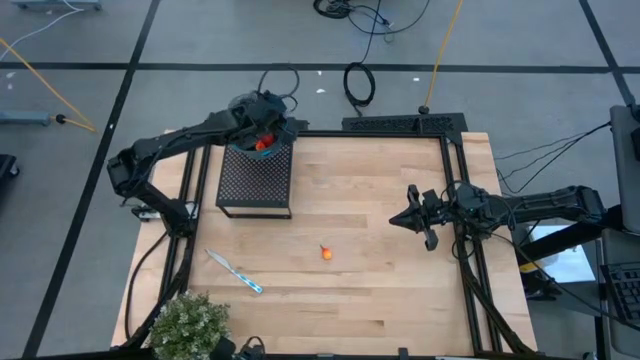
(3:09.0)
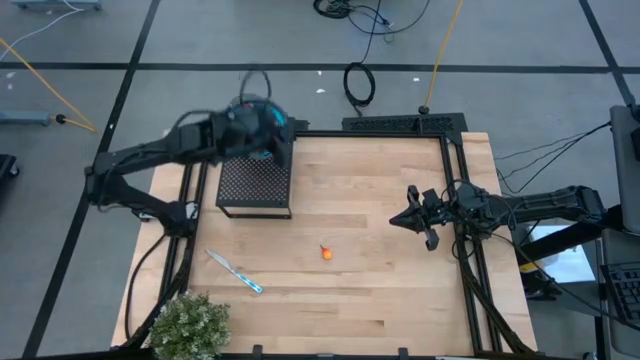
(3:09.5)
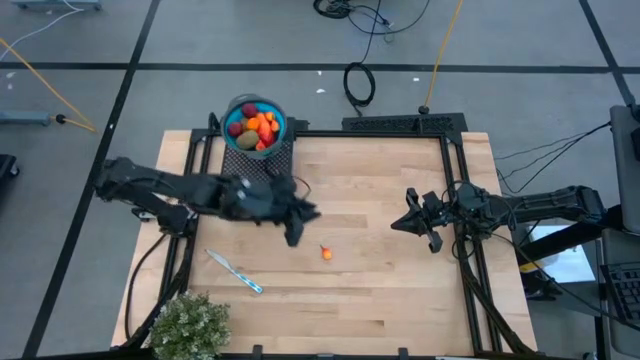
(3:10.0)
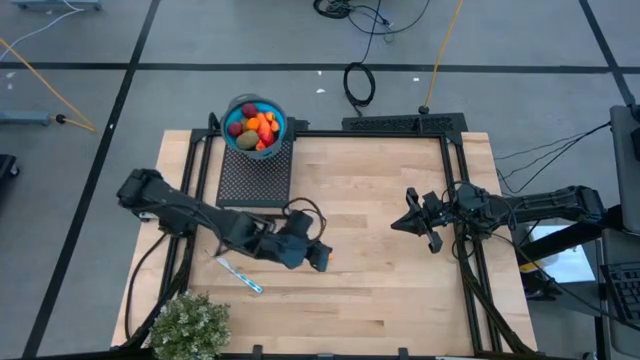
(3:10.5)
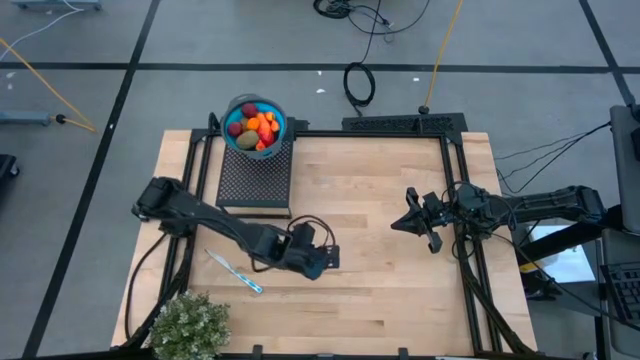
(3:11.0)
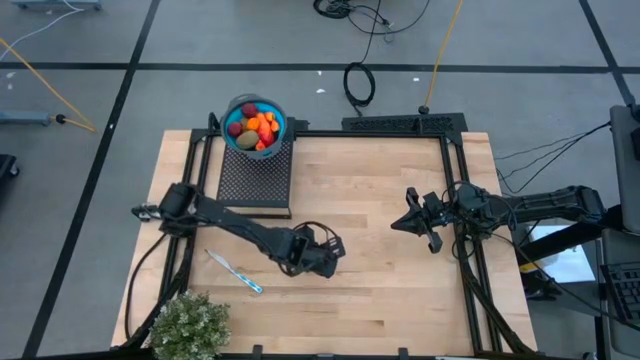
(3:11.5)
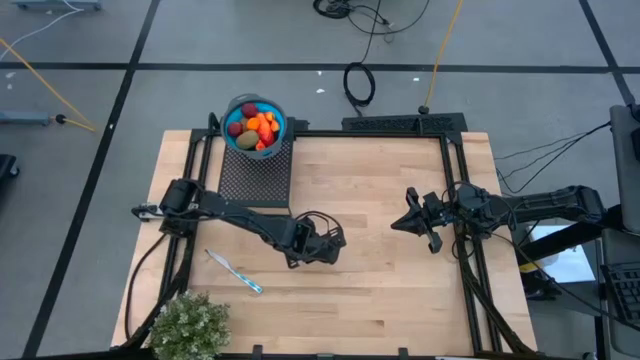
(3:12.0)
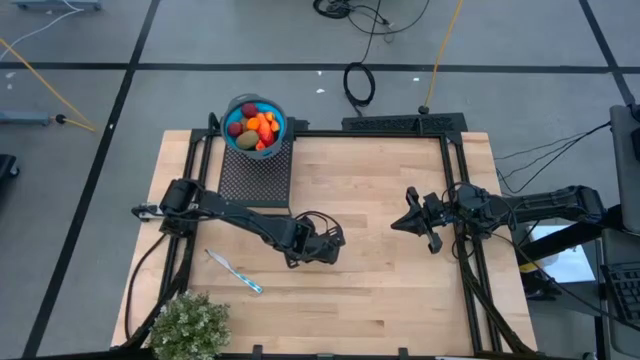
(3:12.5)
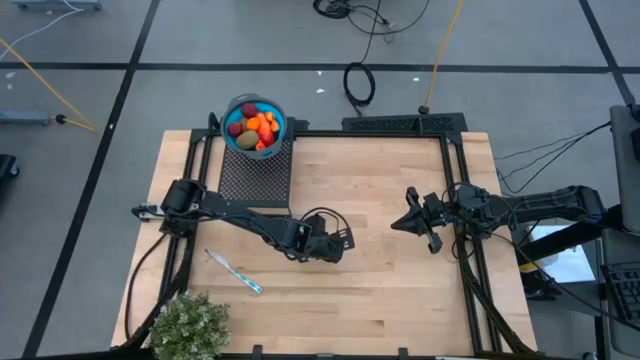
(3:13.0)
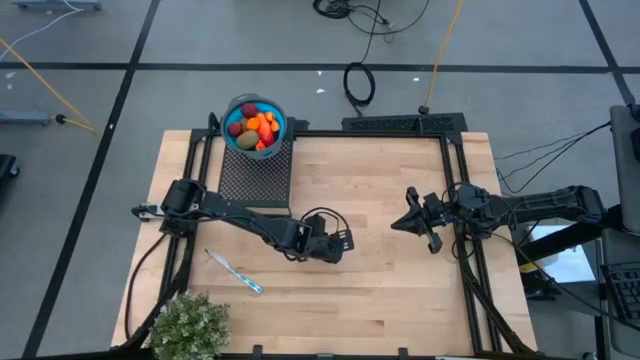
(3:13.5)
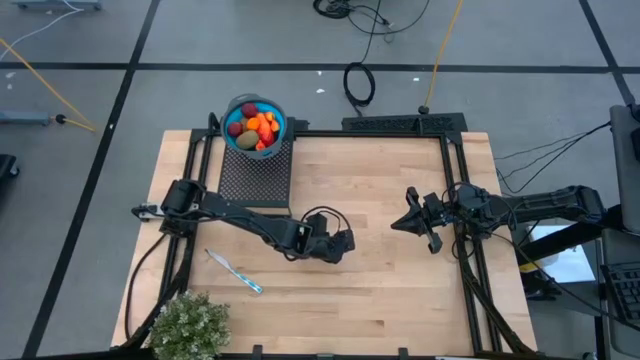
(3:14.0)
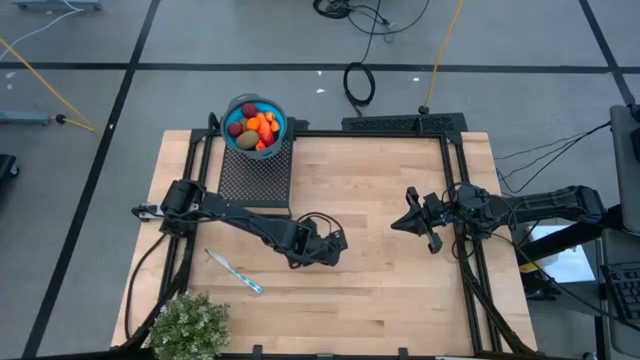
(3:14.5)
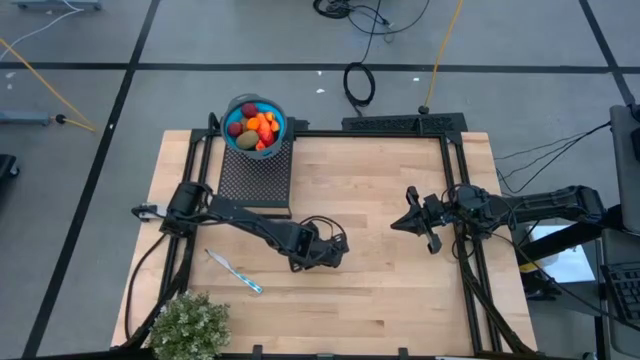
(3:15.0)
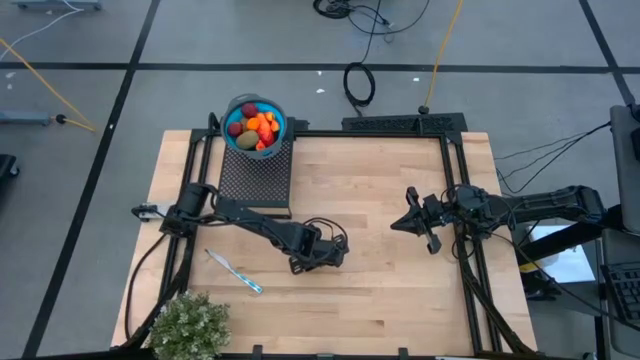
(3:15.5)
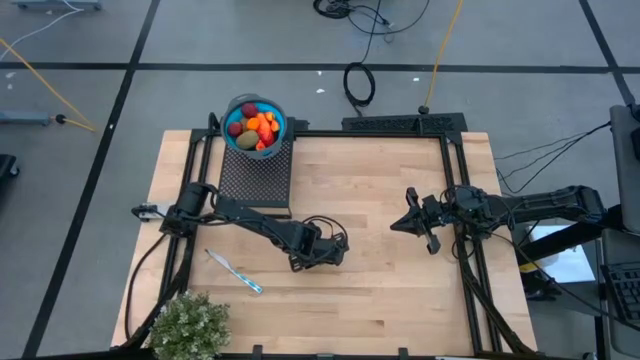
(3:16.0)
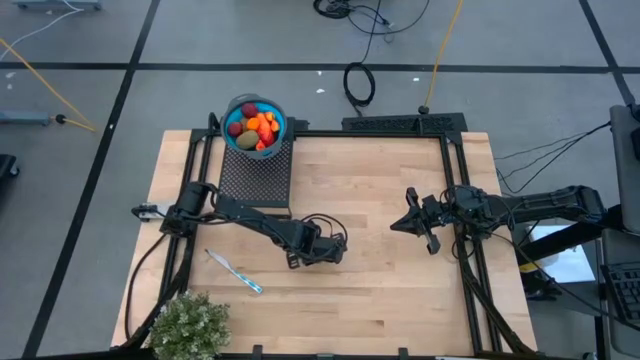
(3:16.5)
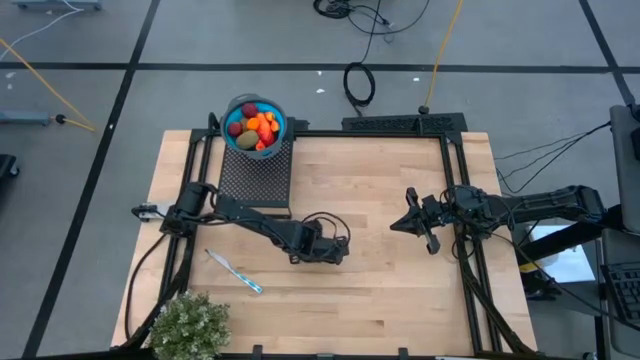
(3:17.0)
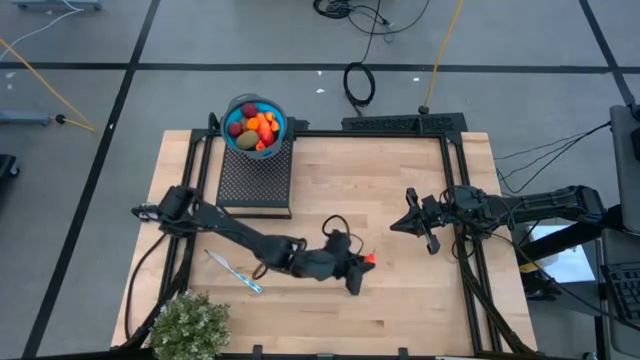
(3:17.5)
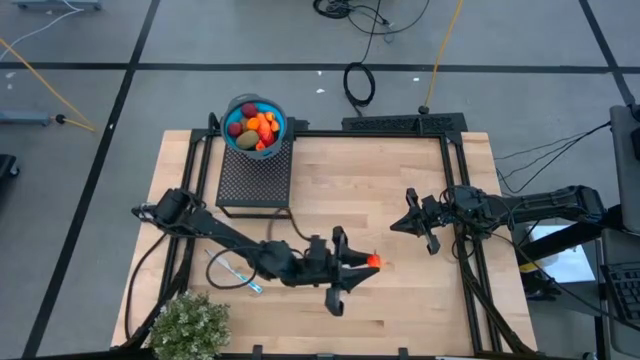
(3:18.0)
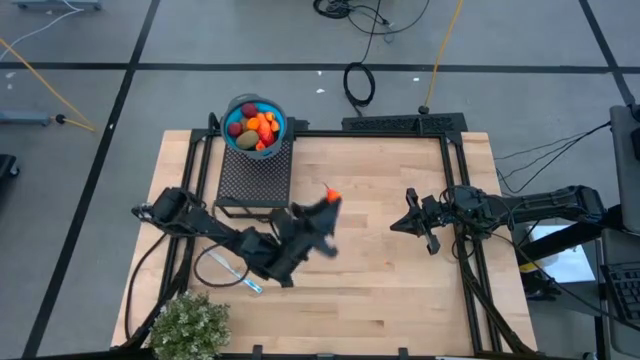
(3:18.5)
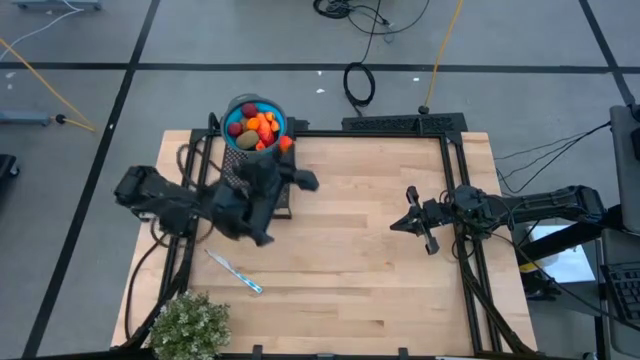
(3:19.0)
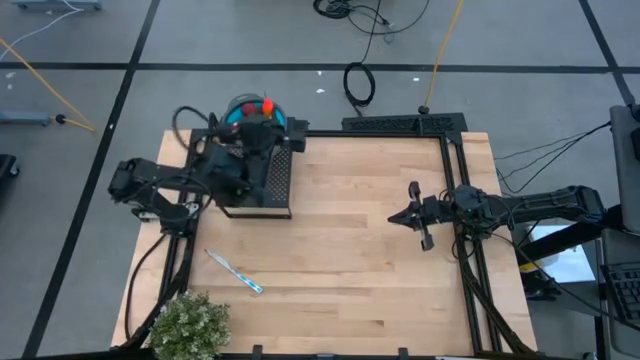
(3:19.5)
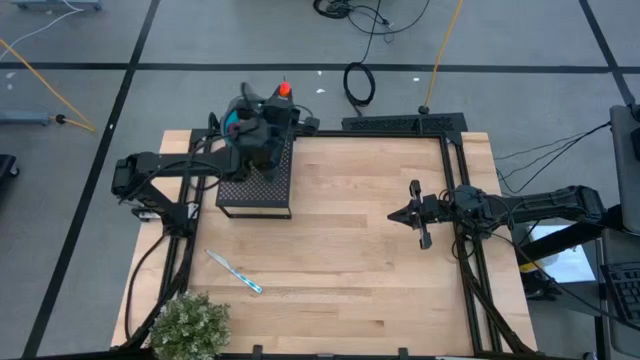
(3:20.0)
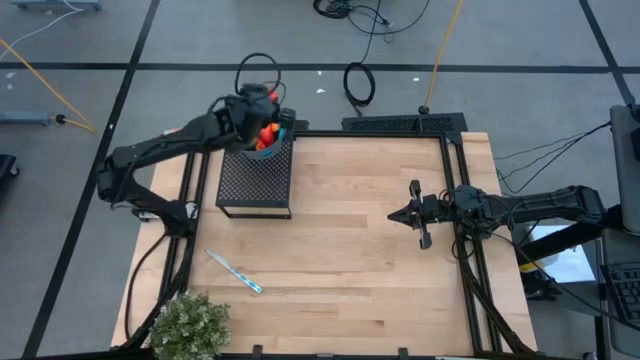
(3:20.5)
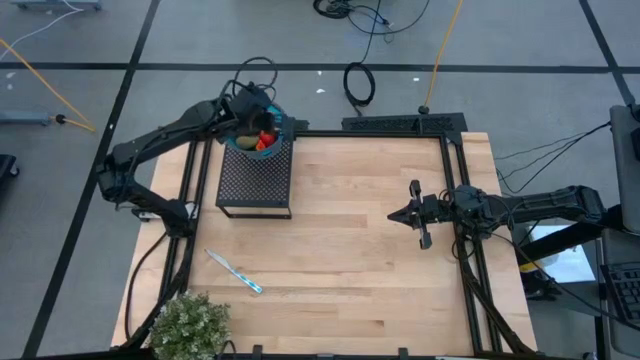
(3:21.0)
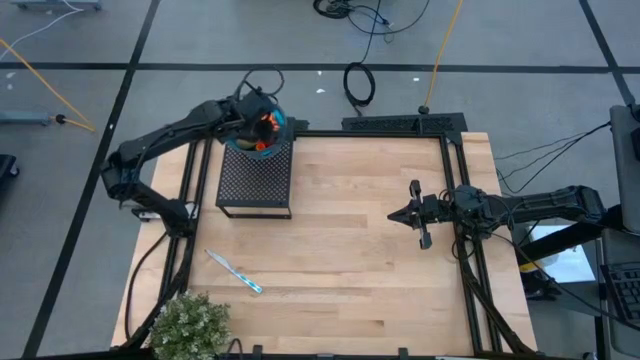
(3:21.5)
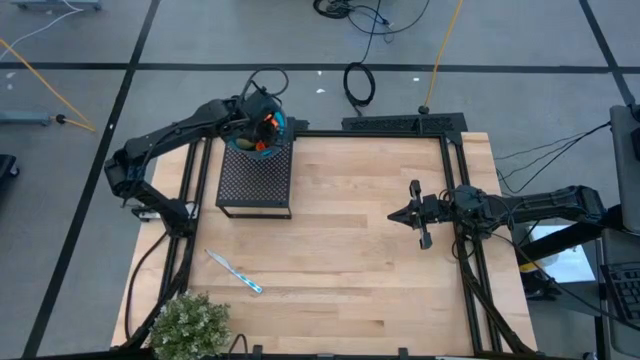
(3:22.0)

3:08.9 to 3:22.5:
Task: Pick & Place Fruit
Put the pear into the blue strainer bowl on the shelf

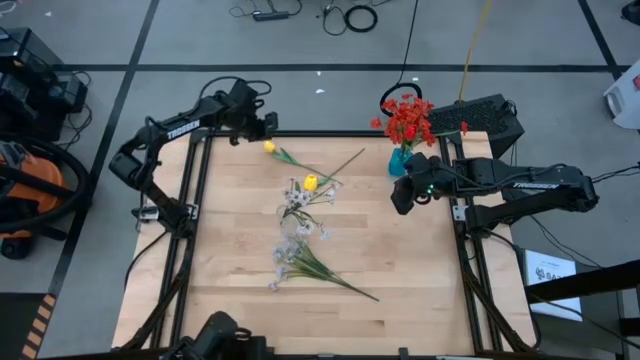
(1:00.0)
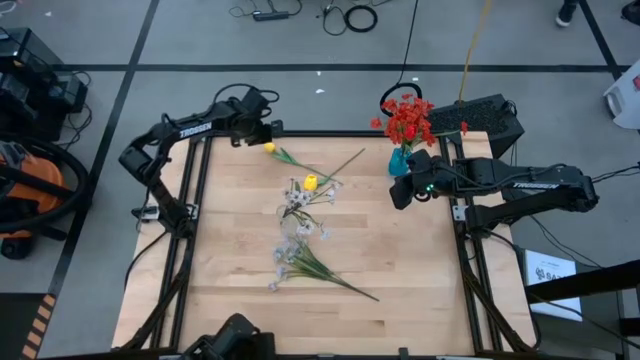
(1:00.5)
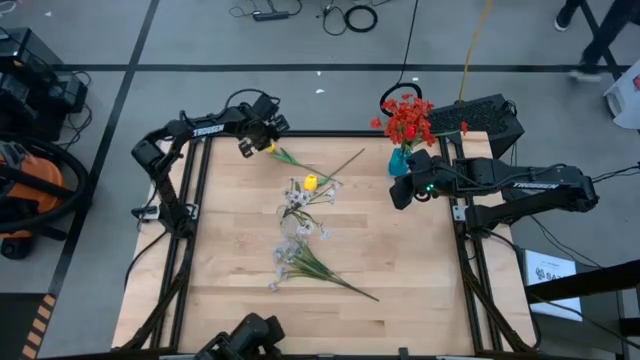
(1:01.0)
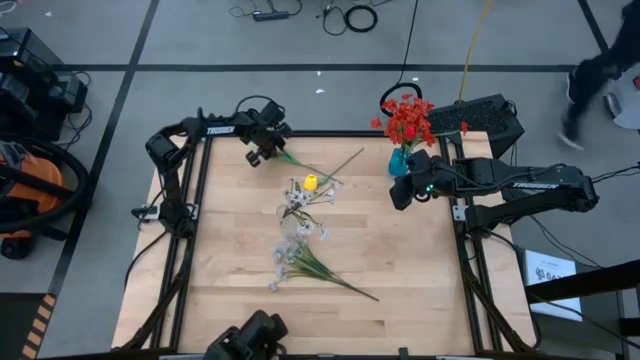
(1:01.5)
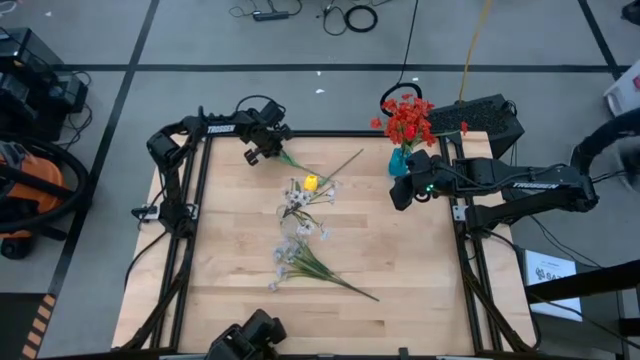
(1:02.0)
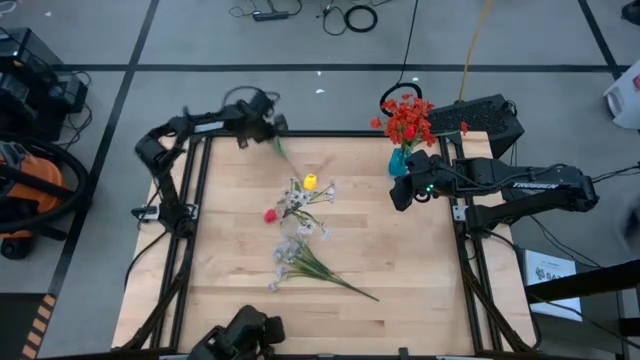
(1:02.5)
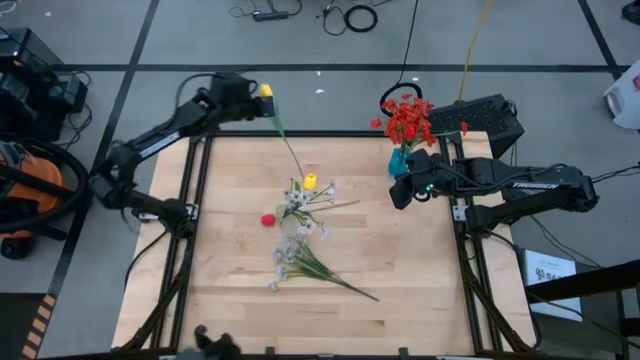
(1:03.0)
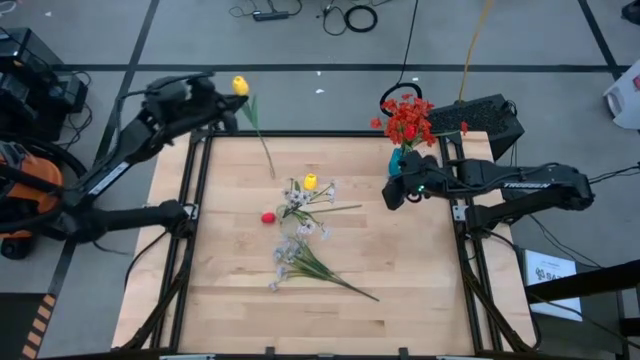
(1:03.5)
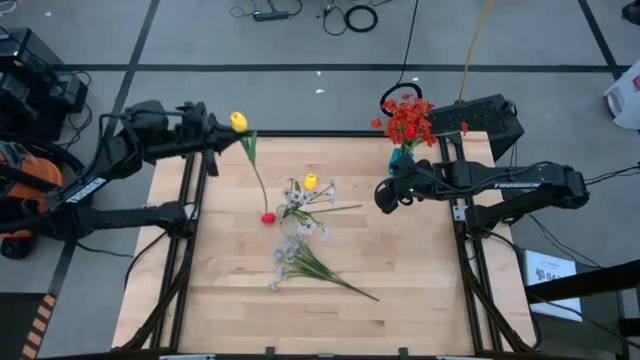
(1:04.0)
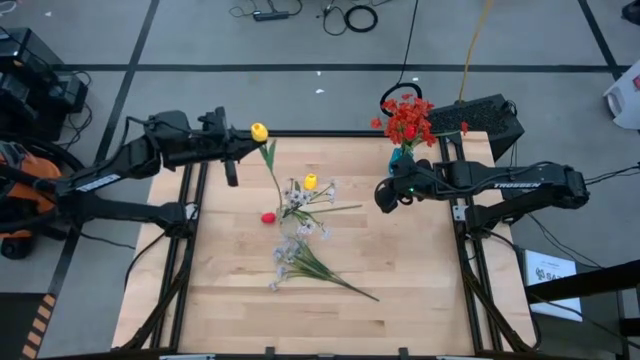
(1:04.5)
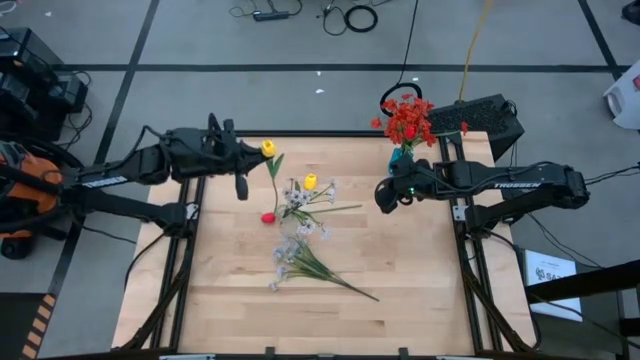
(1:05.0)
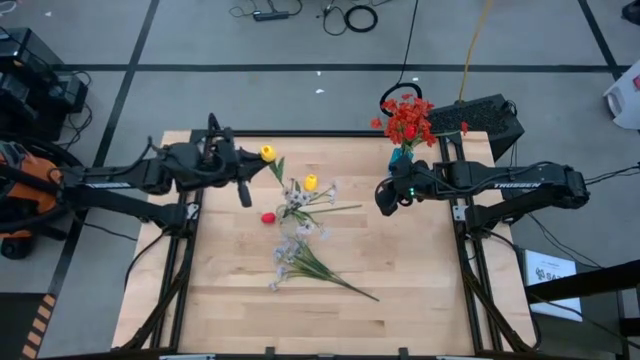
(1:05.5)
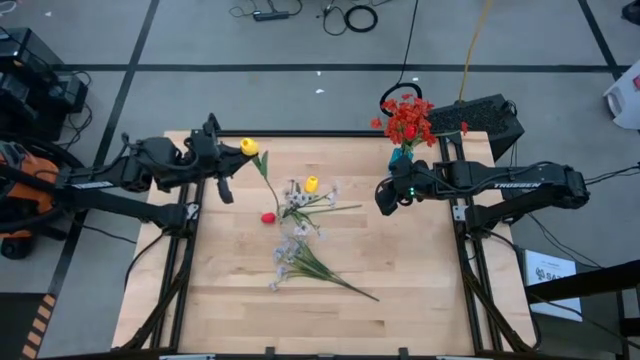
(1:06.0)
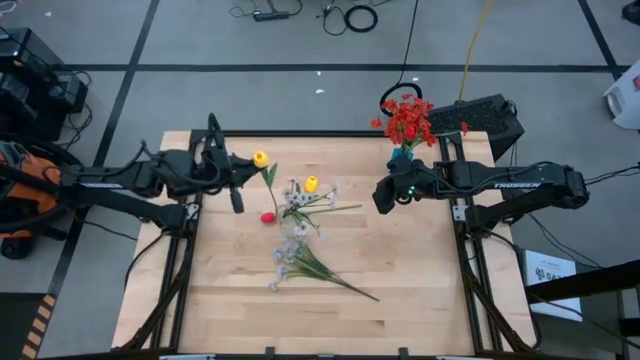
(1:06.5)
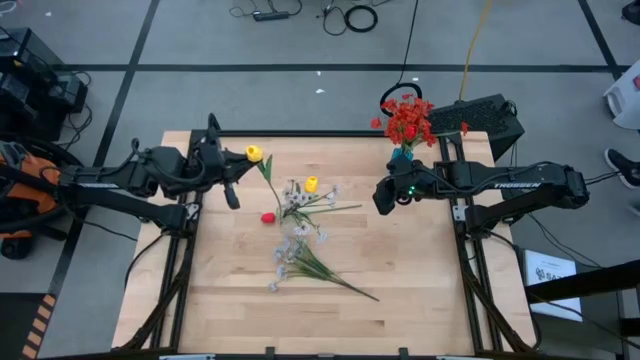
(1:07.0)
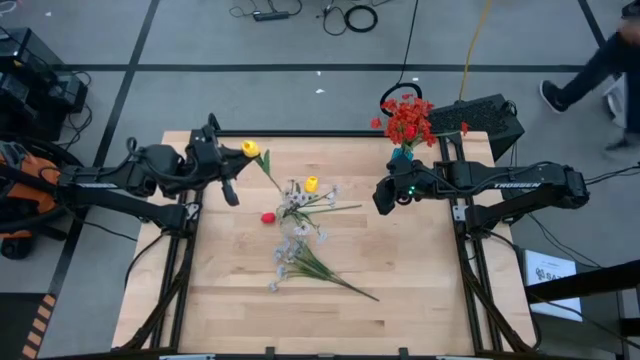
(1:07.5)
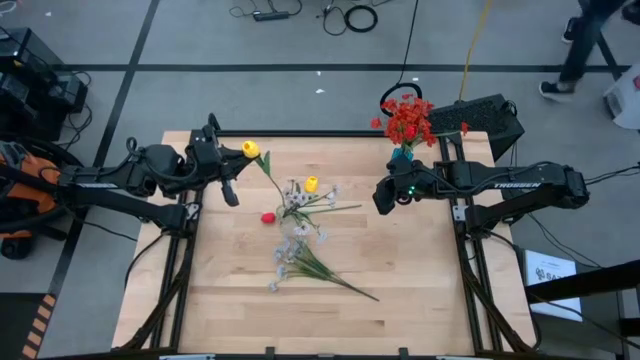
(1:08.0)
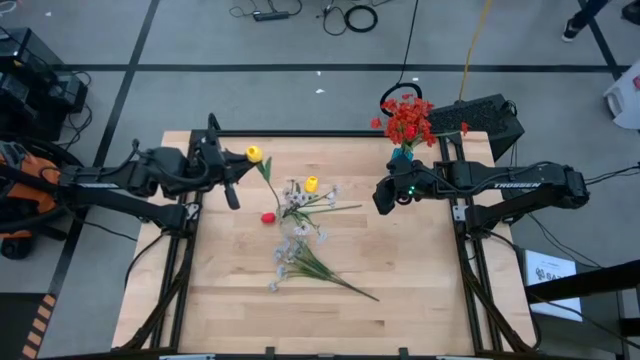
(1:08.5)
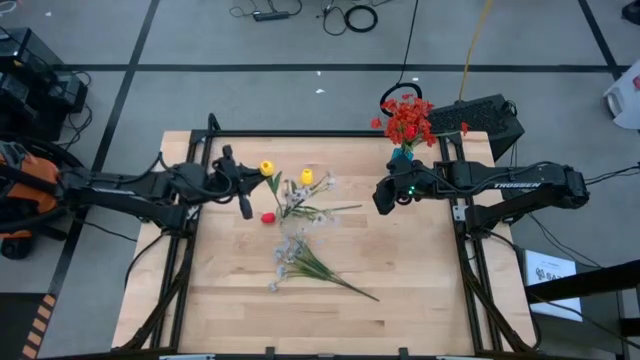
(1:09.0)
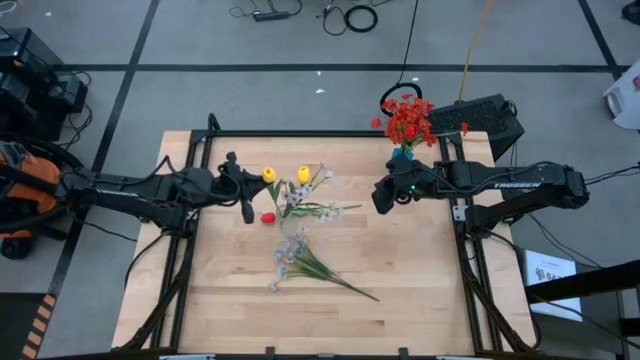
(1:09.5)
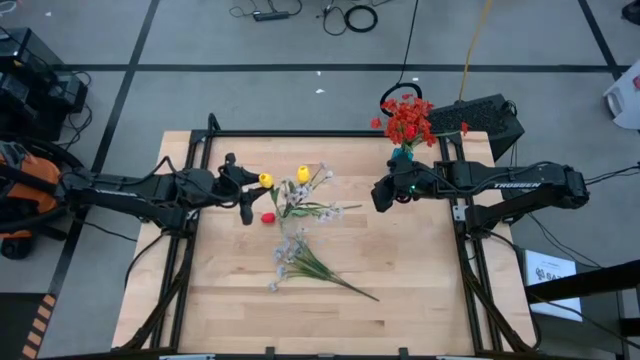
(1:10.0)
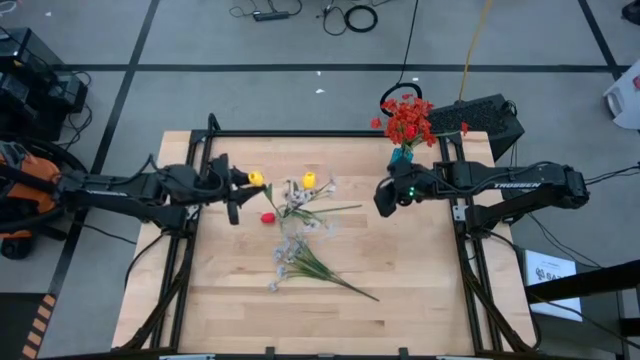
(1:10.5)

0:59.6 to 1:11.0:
Task: Sort flowers into vase by color
Put the yellow flower into the transparent flower vase
